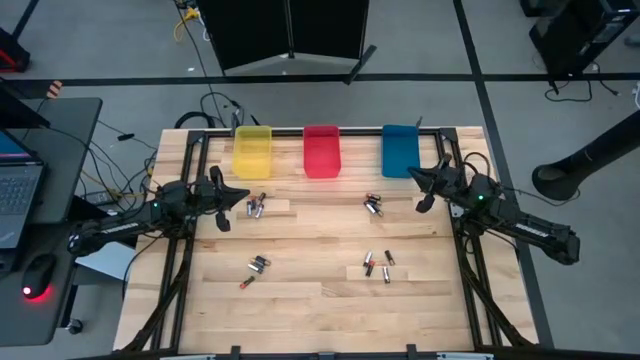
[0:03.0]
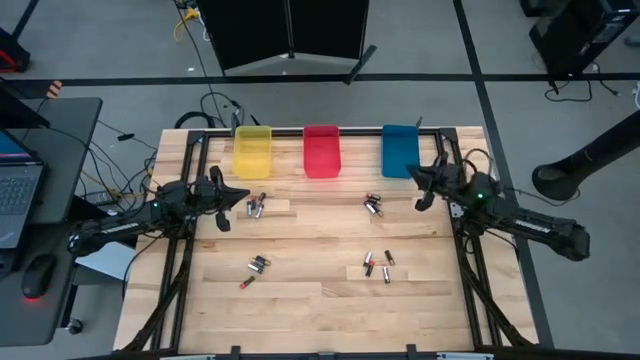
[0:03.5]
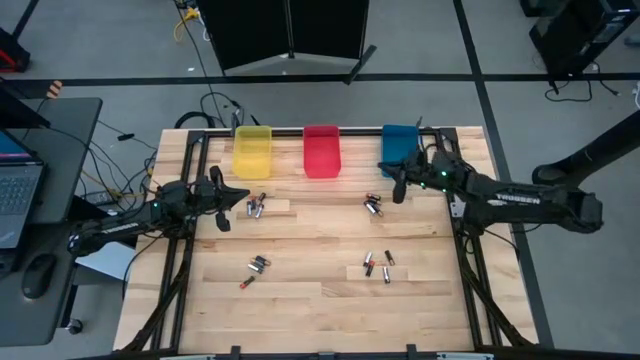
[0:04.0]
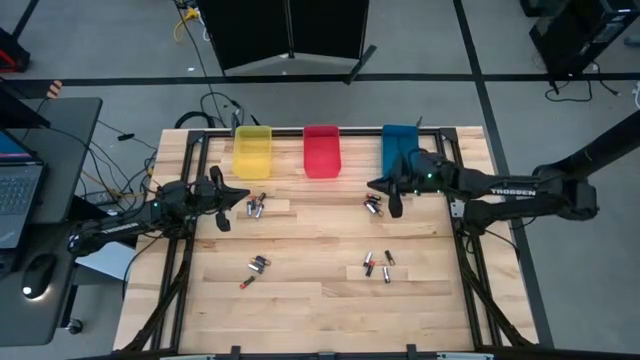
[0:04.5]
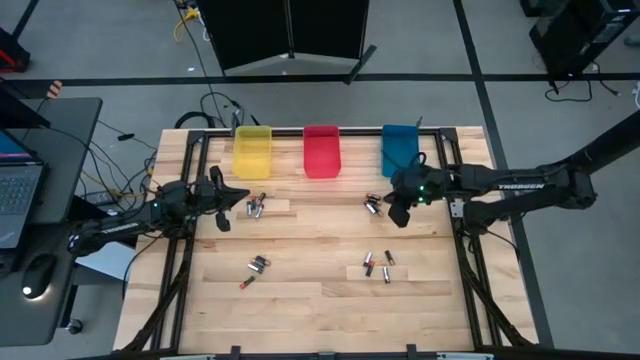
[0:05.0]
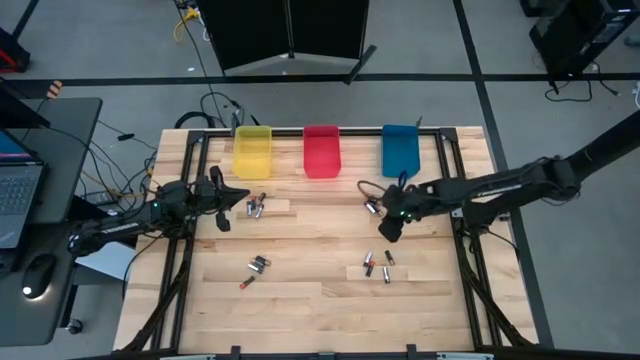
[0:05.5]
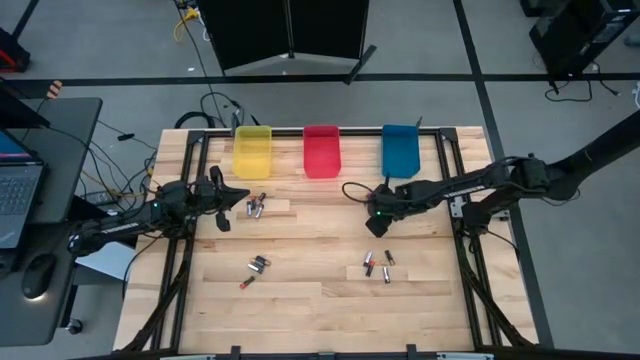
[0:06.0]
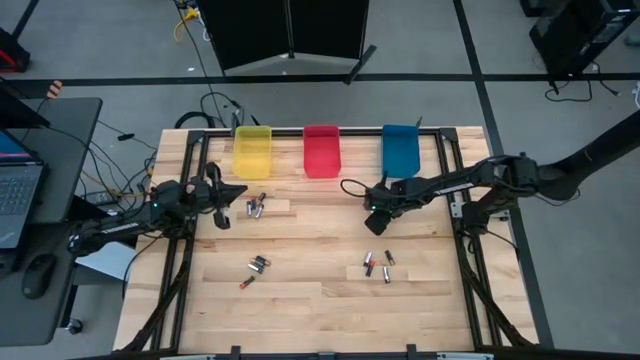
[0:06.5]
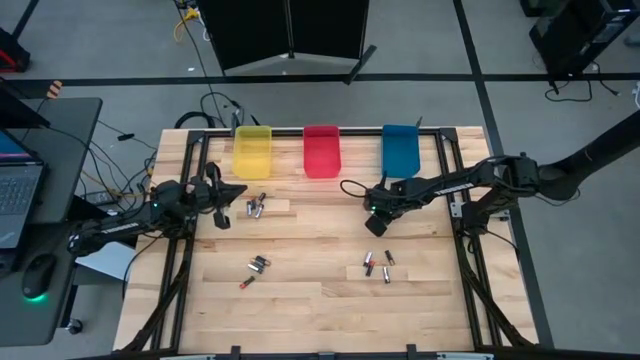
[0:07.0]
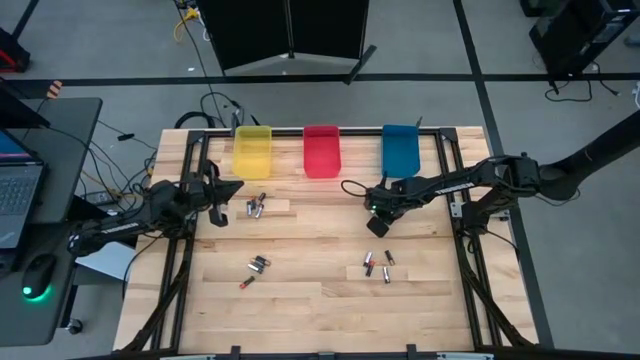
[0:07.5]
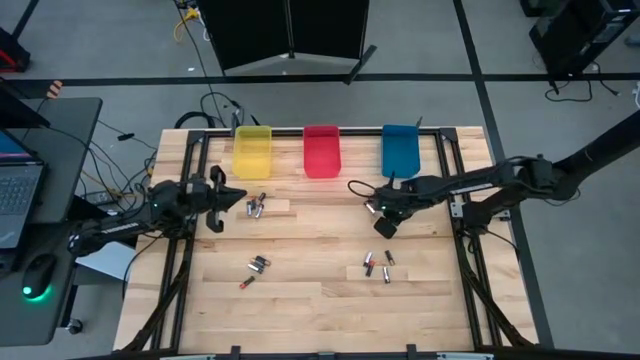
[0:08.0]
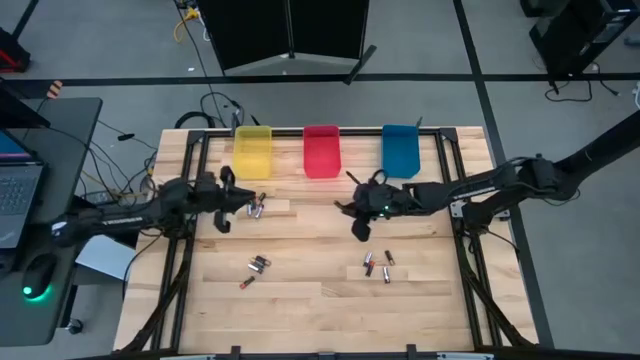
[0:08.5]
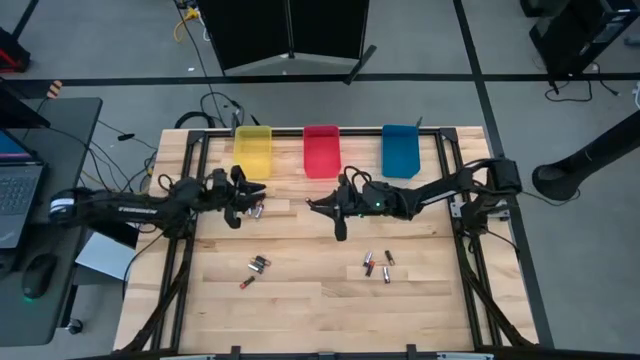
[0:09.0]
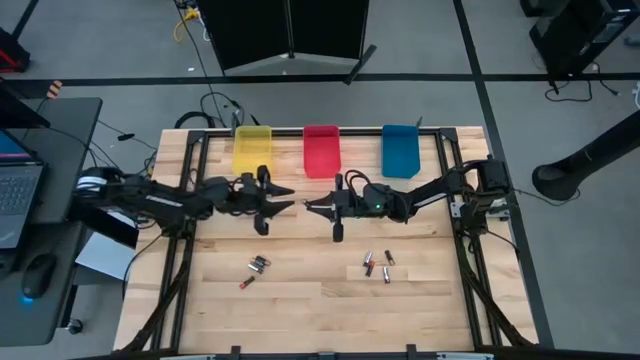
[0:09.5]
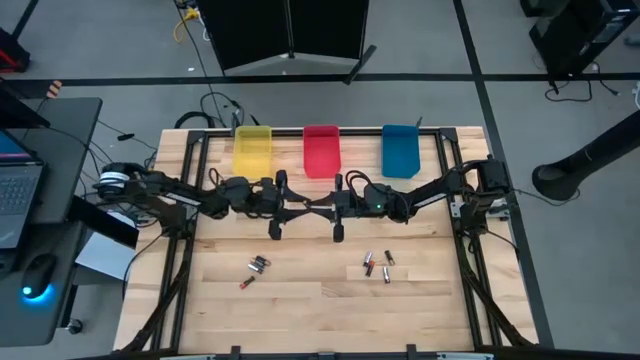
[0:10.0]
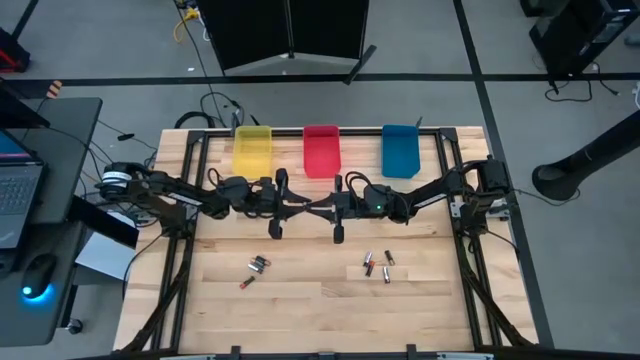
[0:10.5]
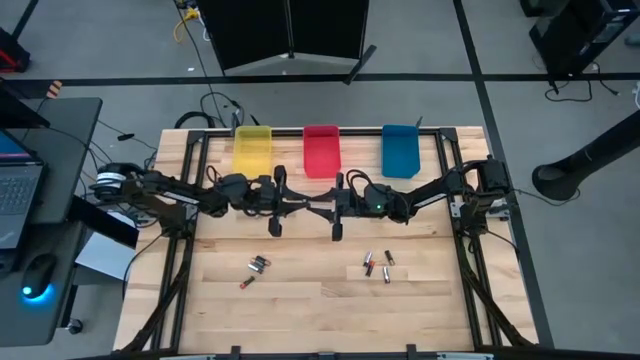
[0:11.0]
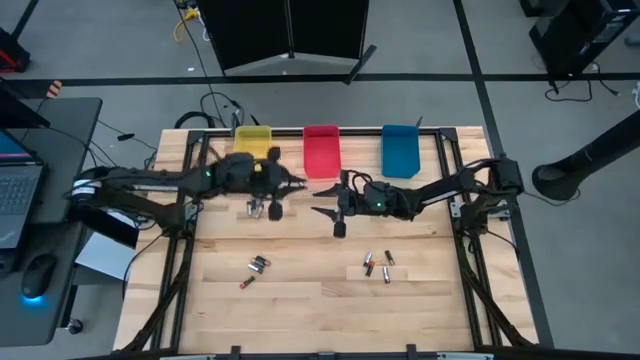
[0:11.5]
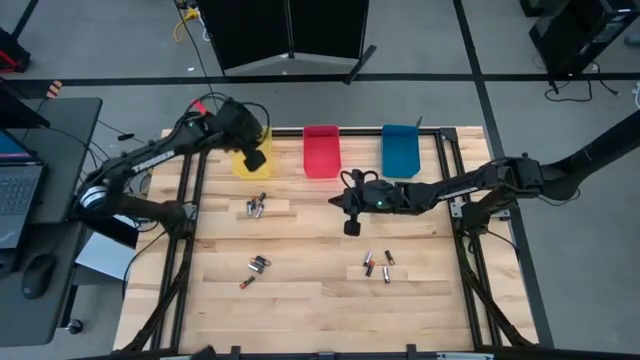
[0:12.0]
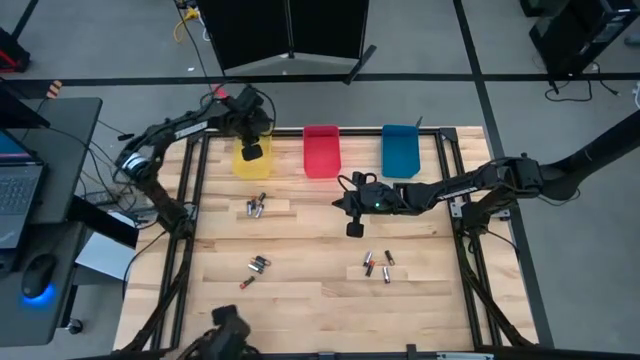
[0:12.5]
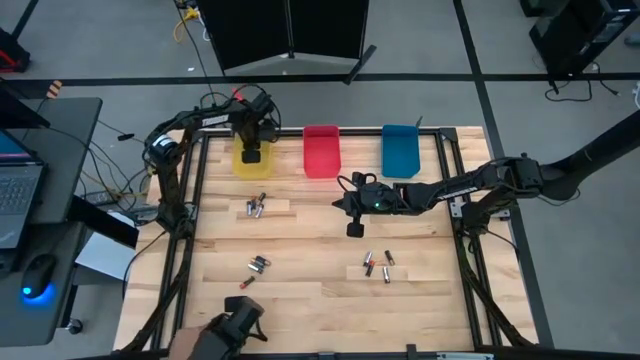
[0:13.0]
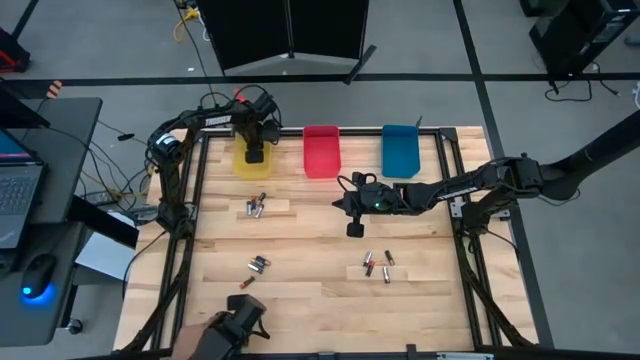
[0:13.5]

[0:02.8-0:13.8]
Task: Sort batteries
Put the brown battery into the yellow bin

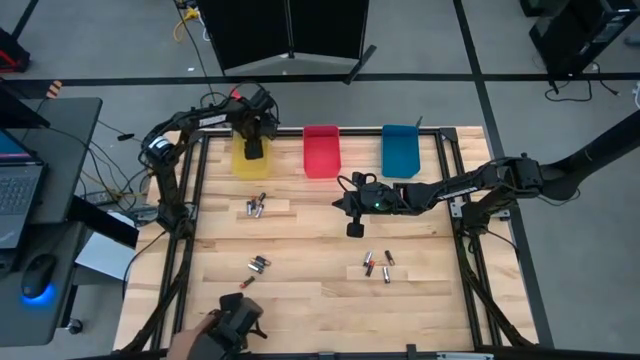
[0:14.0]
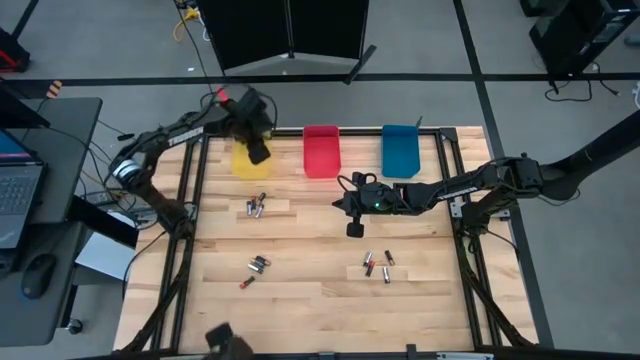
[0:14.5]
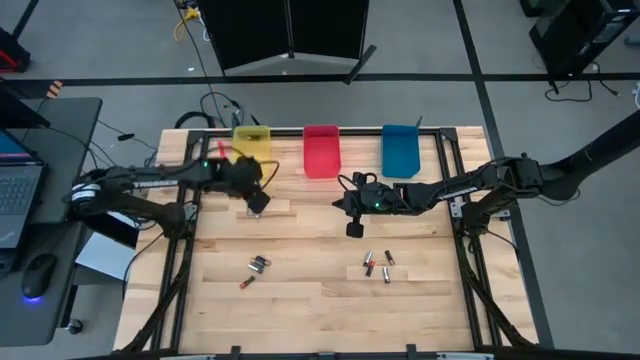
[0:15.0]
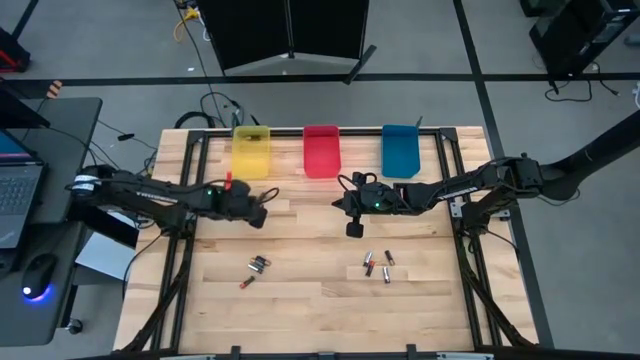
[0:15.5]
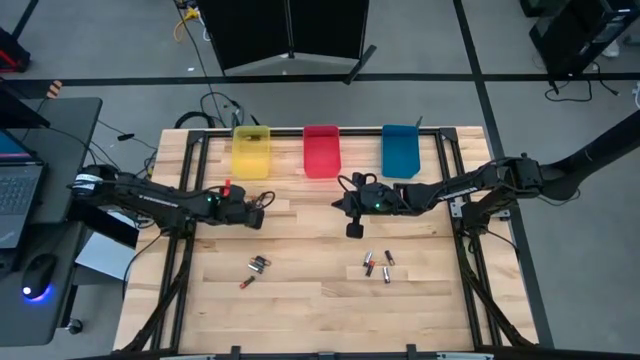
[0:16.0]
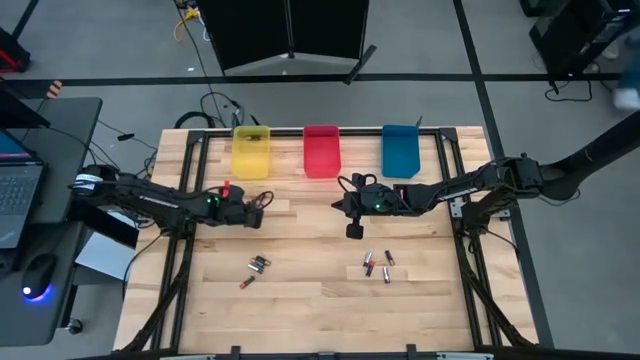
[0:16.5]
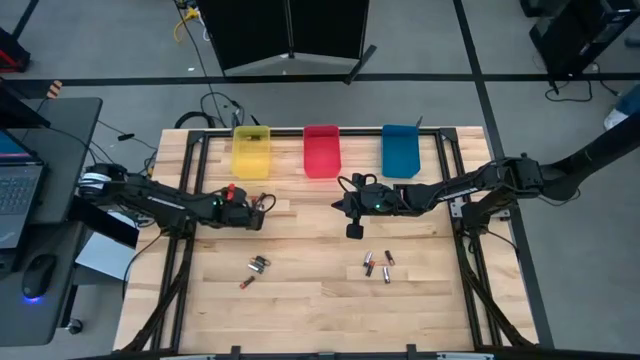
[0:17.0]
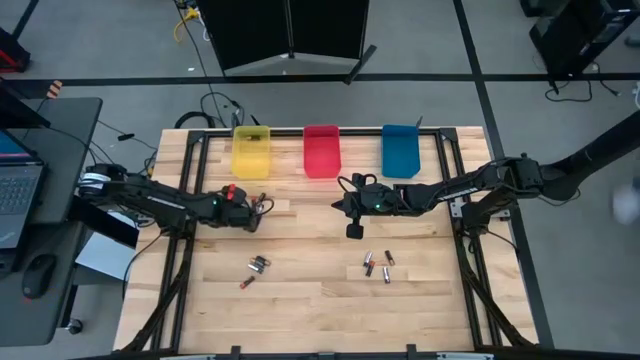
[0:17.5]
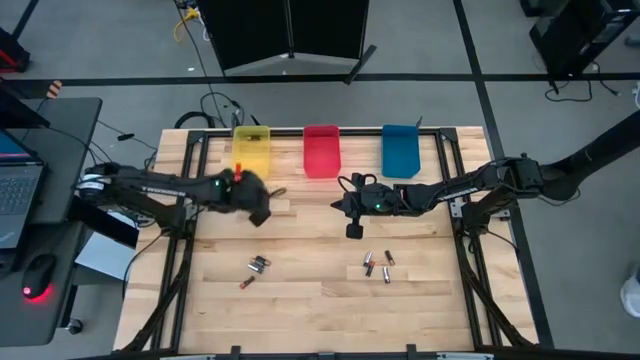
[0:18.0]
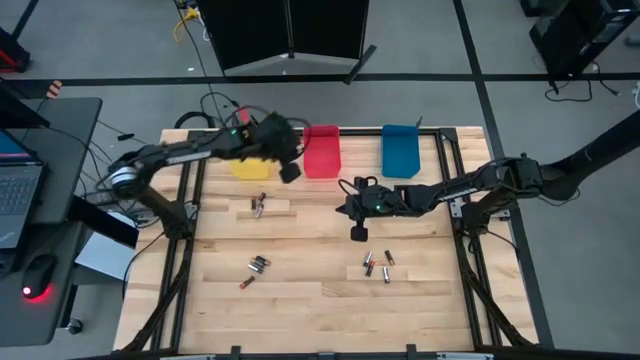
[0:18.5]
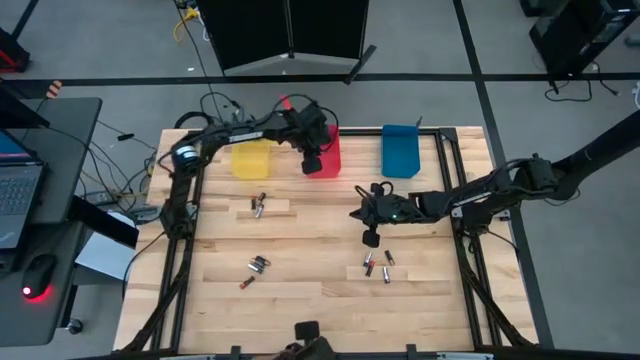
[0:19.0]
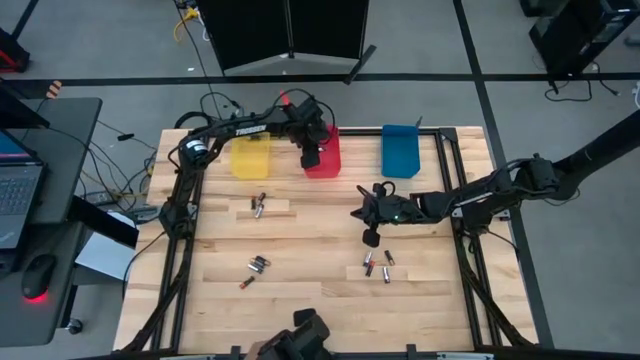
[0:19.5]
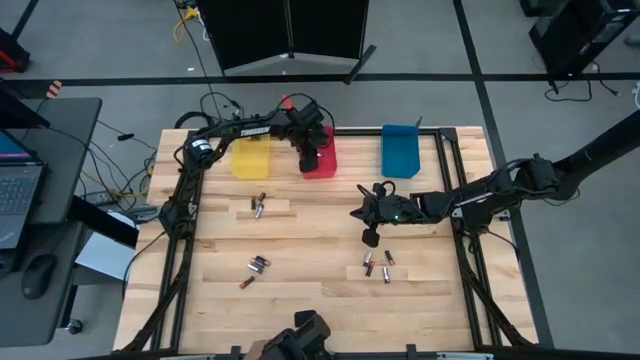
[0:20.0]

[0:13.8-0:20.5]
Put the silver battery into the red bin

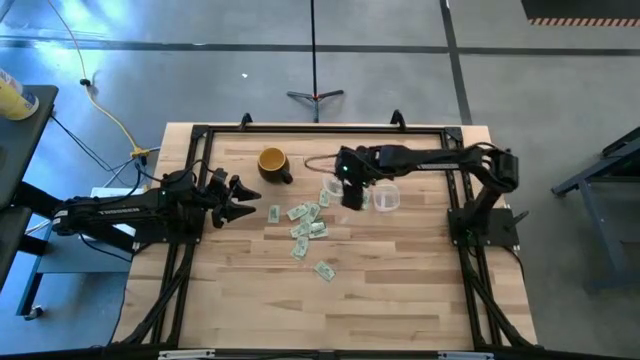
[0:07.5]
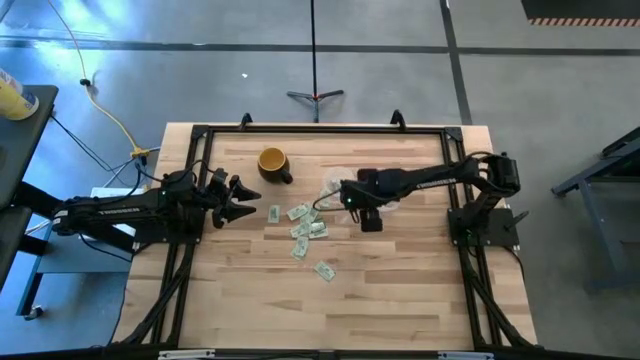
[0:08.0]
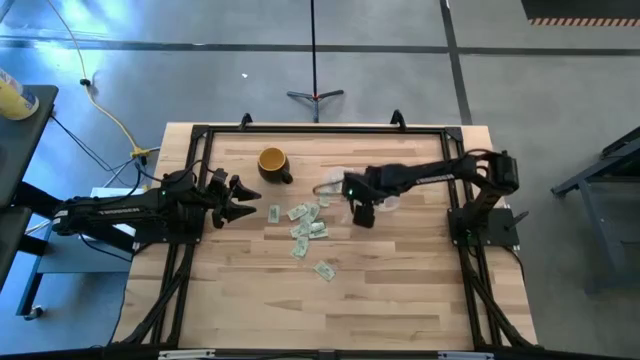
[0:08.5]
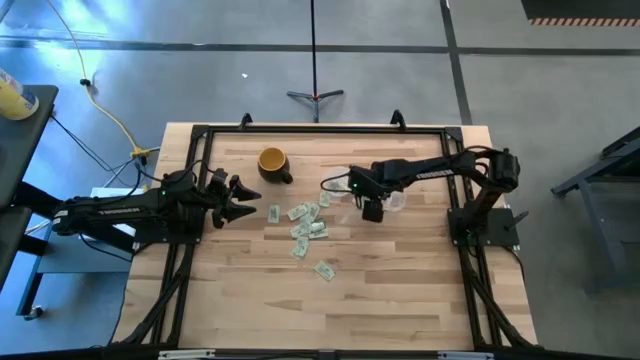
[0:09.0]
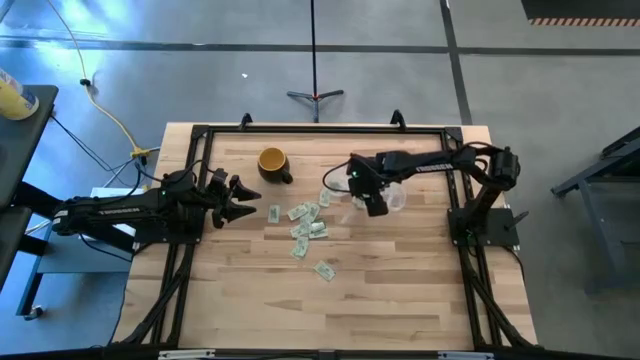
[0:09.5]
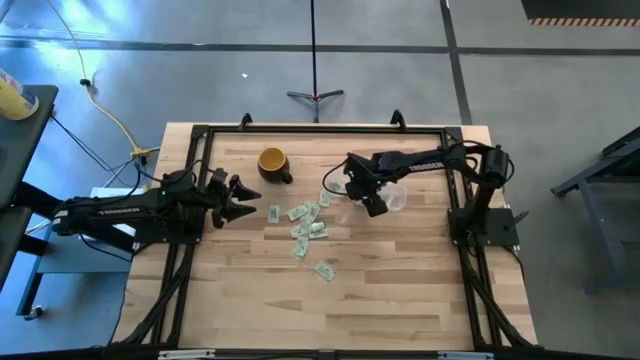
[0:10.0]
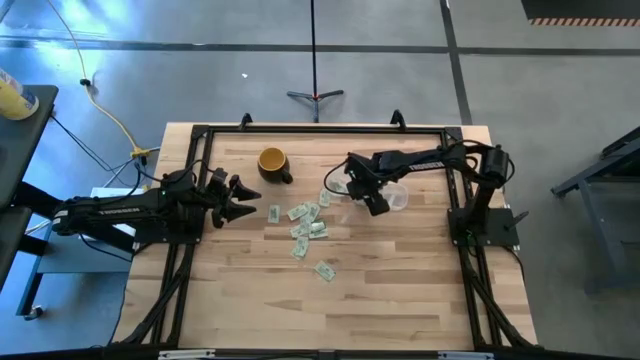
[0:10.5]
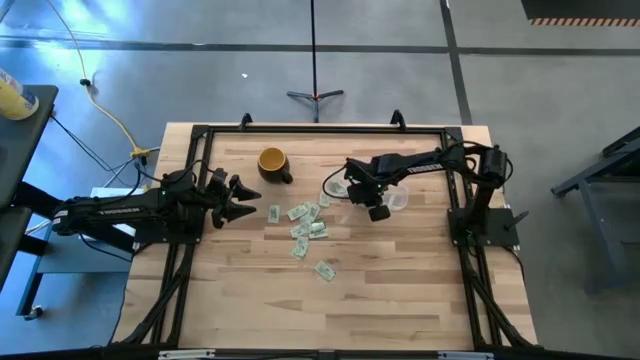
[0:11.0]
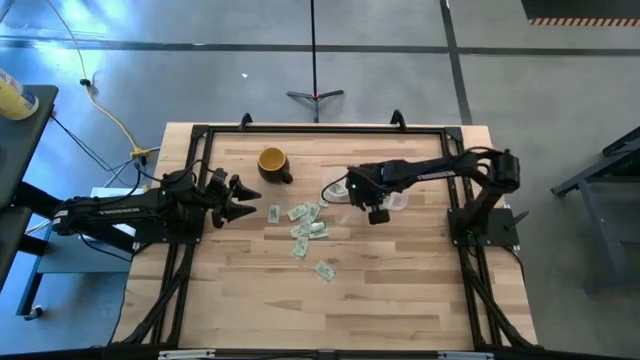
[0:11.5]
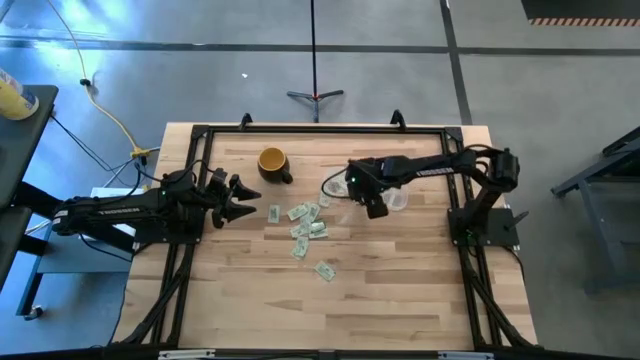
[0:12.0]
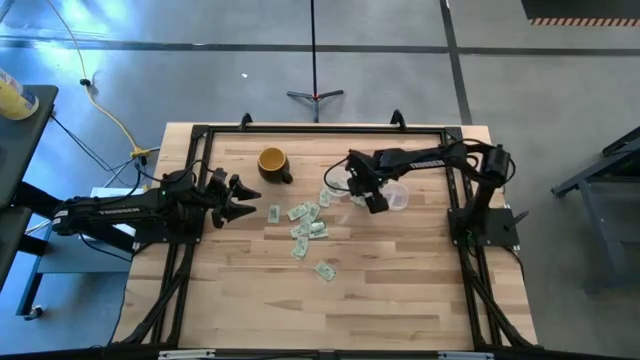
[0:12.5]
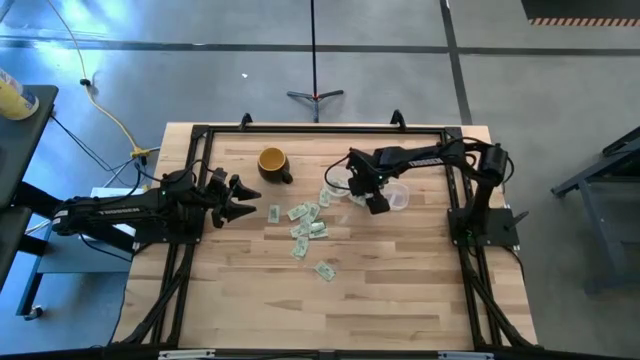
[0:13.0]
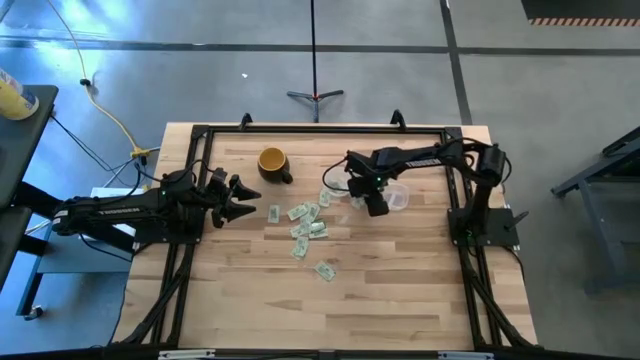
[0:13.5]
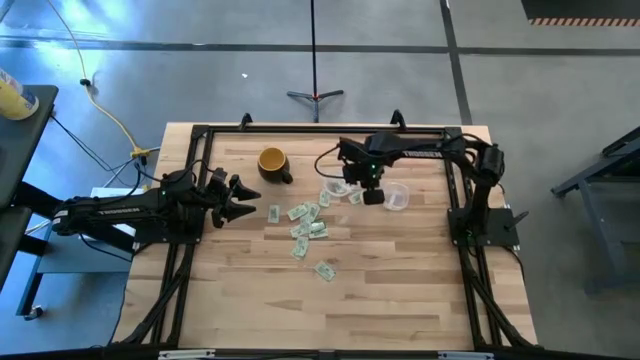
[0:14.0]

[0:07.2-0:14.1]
Task: Pick and place items into bin
Put the light green stevia packet into the left transparent bin
